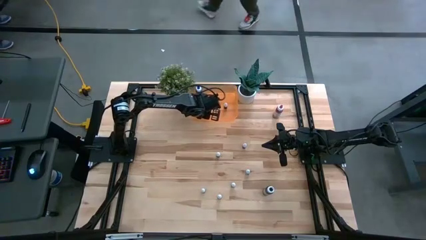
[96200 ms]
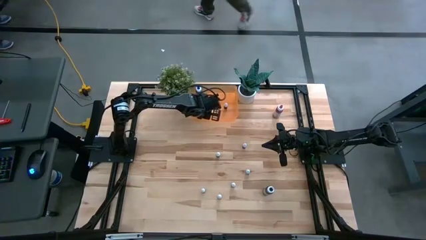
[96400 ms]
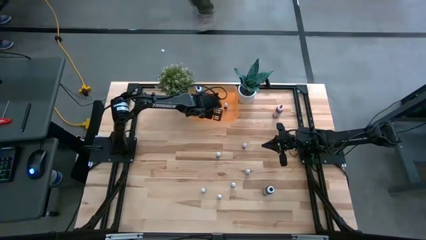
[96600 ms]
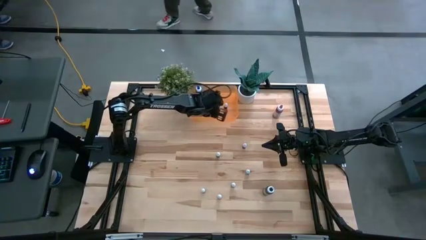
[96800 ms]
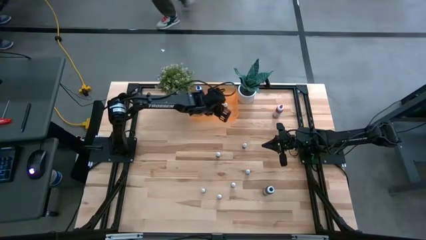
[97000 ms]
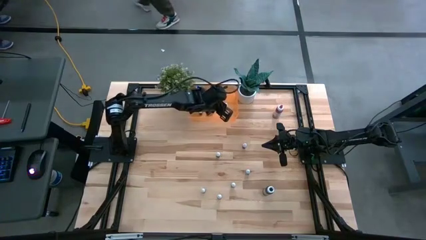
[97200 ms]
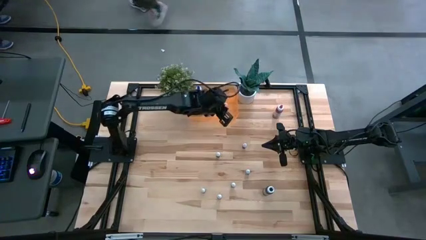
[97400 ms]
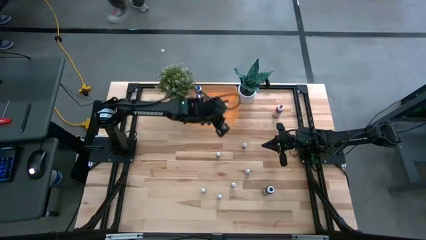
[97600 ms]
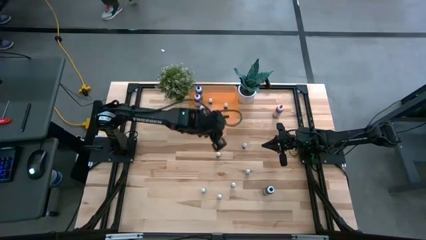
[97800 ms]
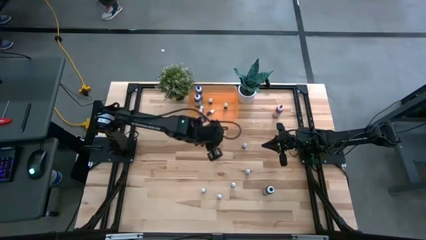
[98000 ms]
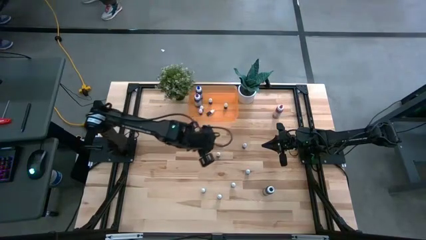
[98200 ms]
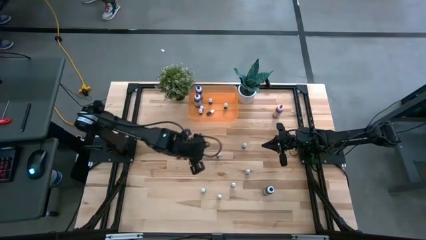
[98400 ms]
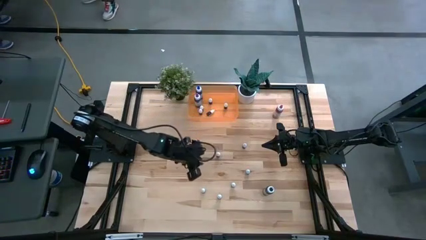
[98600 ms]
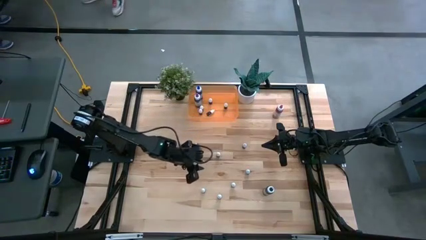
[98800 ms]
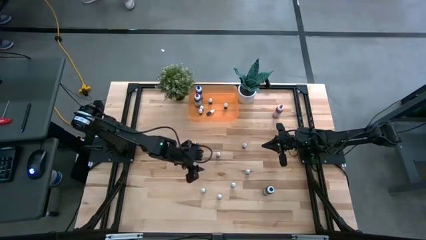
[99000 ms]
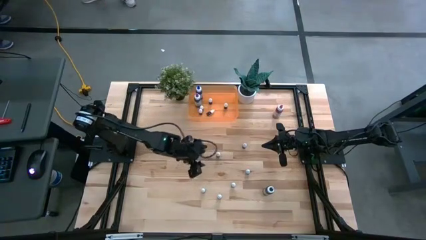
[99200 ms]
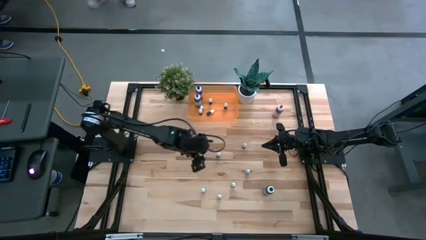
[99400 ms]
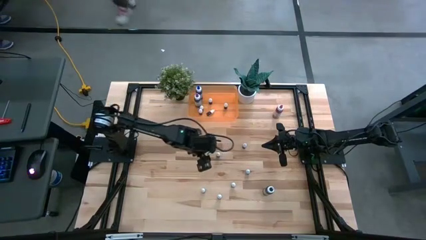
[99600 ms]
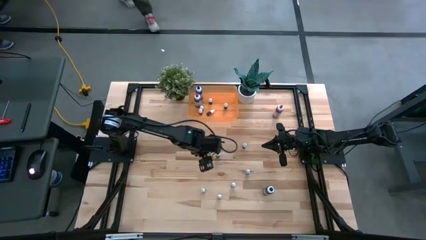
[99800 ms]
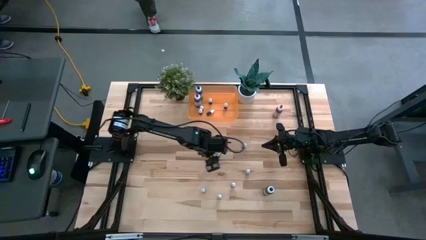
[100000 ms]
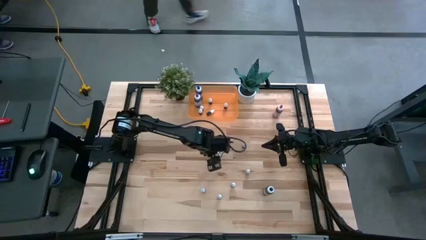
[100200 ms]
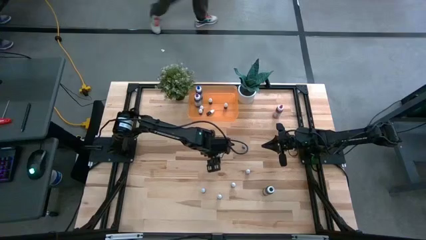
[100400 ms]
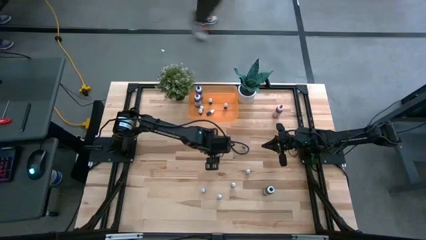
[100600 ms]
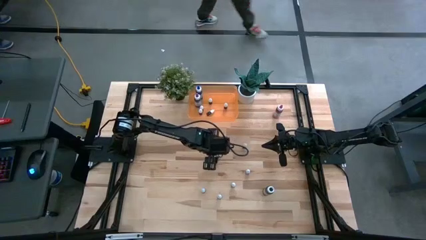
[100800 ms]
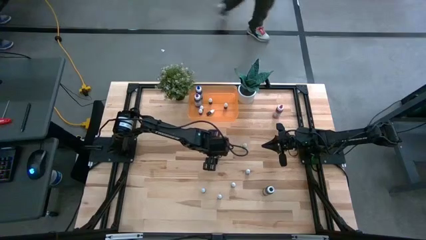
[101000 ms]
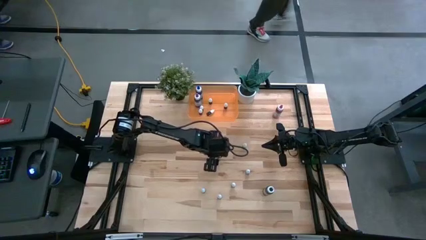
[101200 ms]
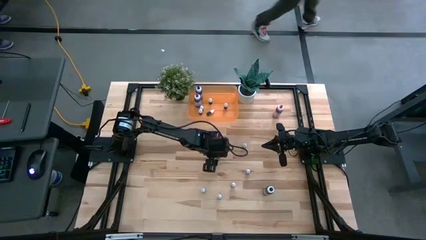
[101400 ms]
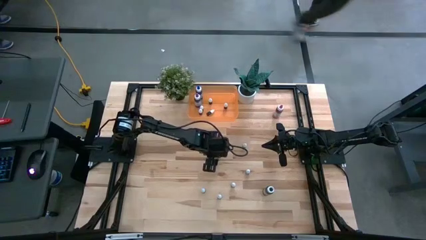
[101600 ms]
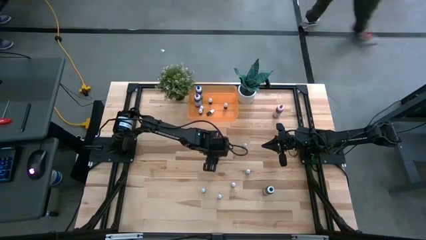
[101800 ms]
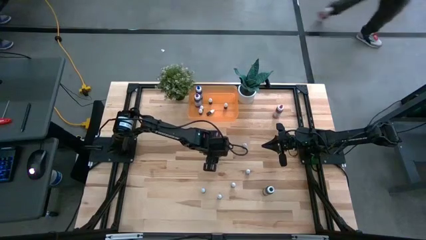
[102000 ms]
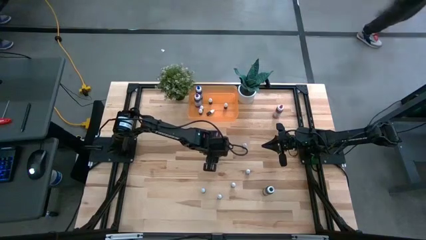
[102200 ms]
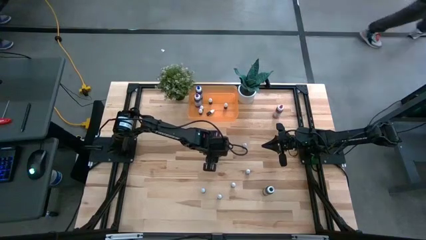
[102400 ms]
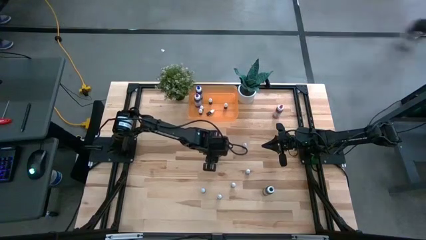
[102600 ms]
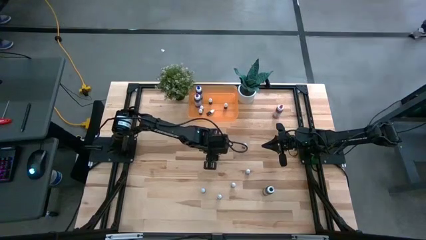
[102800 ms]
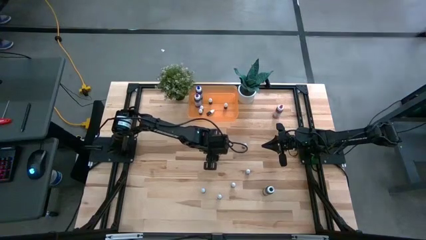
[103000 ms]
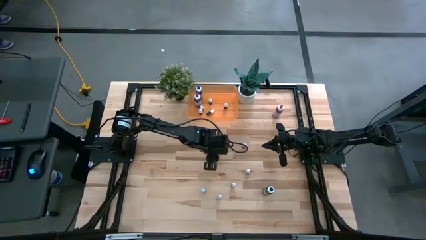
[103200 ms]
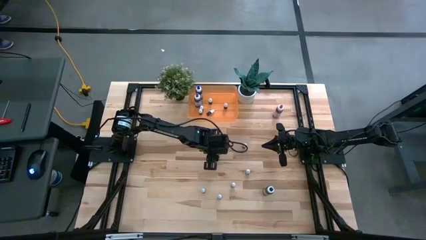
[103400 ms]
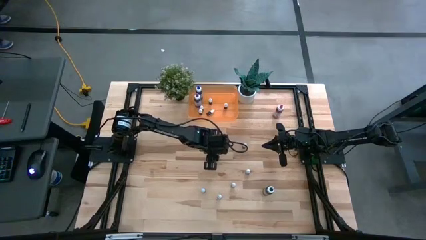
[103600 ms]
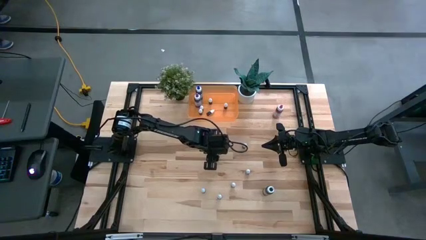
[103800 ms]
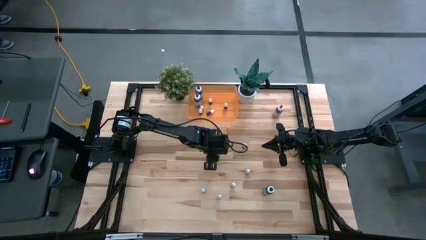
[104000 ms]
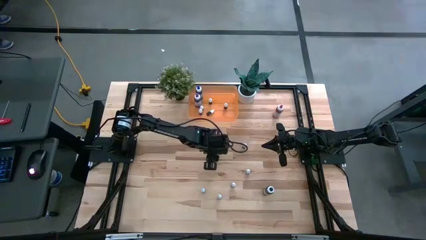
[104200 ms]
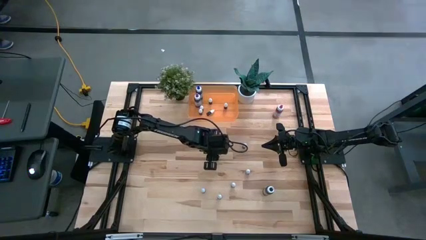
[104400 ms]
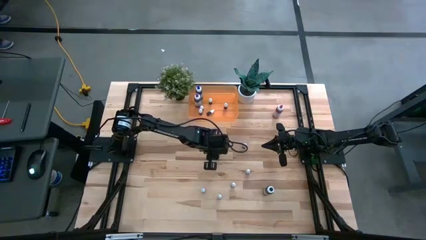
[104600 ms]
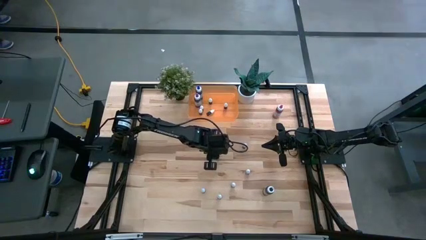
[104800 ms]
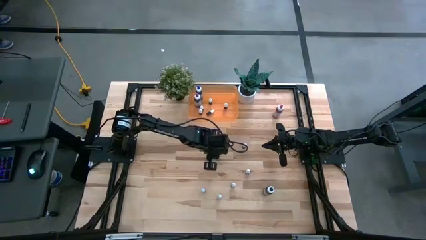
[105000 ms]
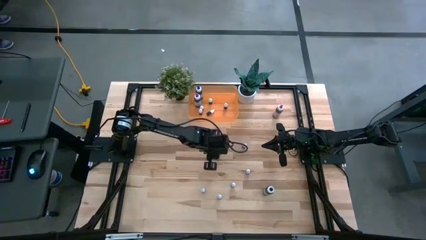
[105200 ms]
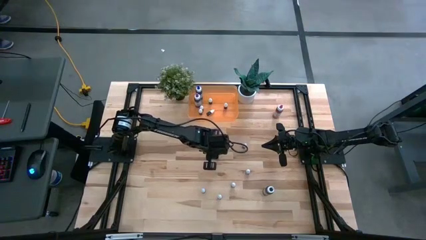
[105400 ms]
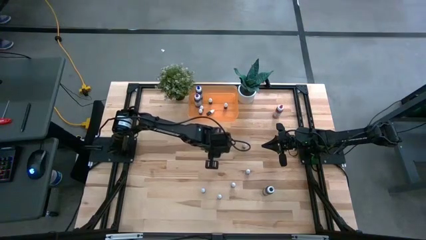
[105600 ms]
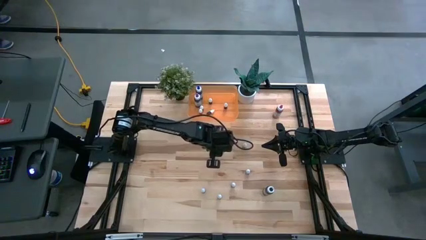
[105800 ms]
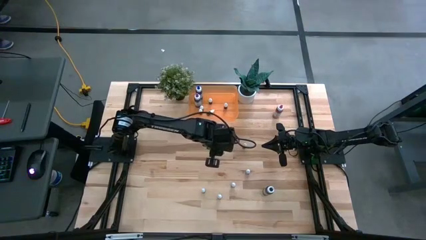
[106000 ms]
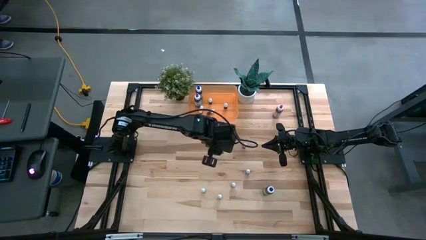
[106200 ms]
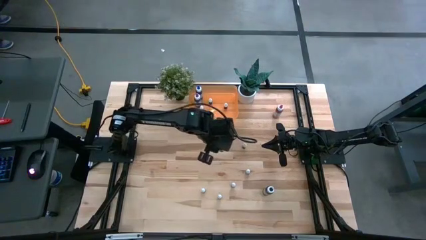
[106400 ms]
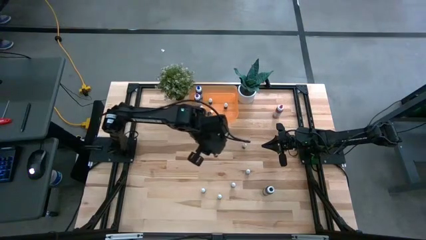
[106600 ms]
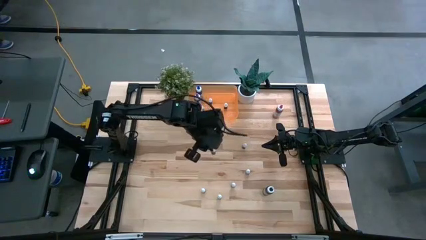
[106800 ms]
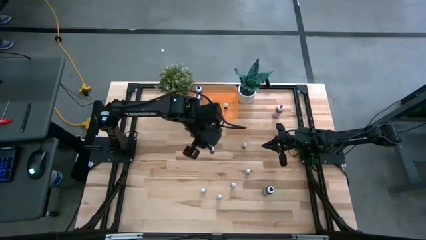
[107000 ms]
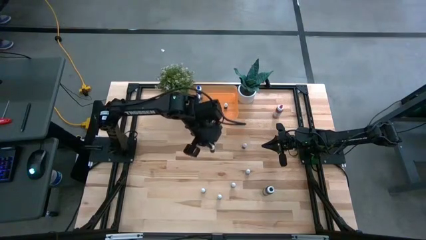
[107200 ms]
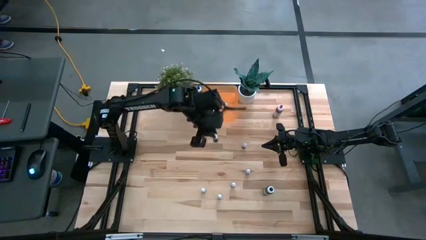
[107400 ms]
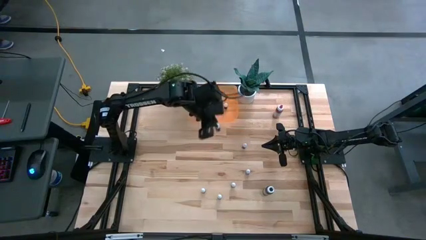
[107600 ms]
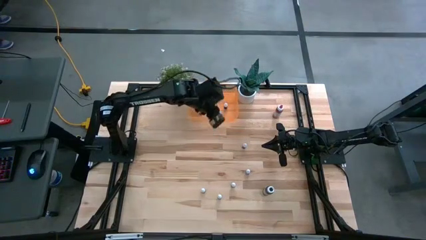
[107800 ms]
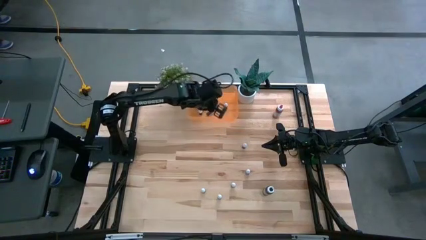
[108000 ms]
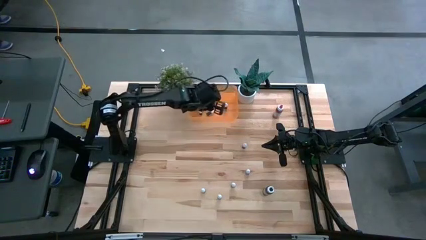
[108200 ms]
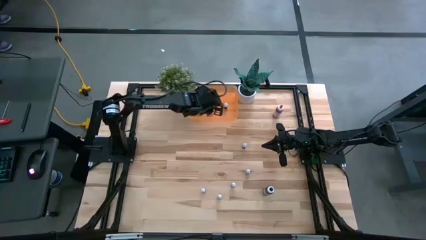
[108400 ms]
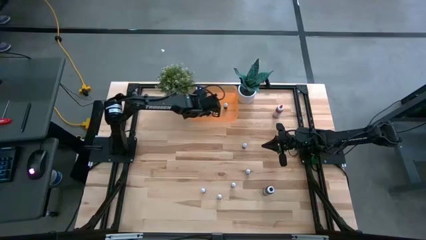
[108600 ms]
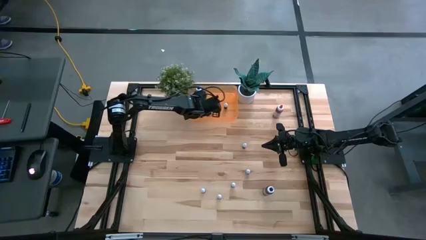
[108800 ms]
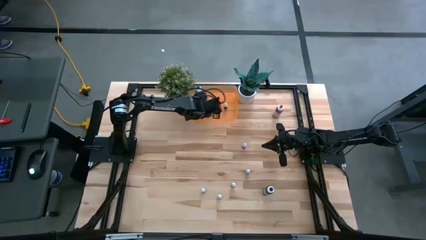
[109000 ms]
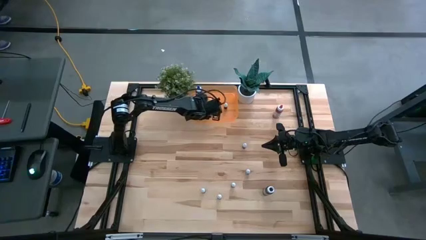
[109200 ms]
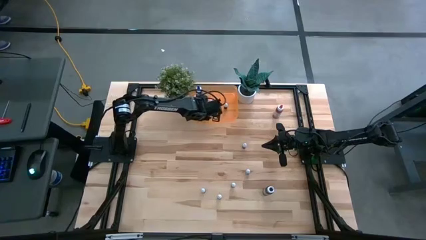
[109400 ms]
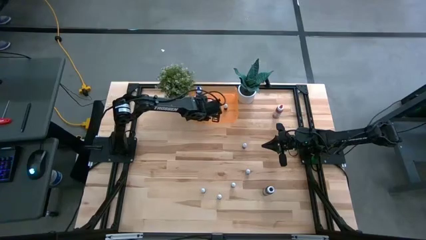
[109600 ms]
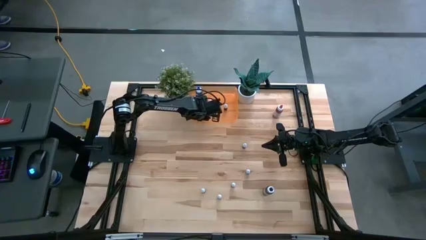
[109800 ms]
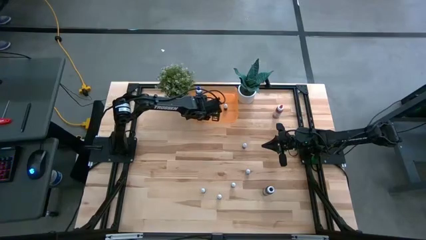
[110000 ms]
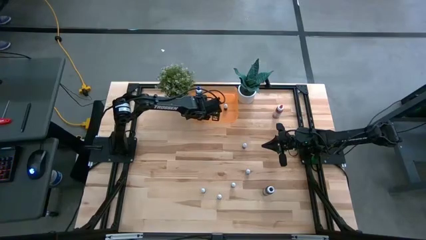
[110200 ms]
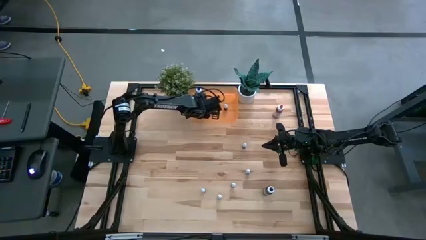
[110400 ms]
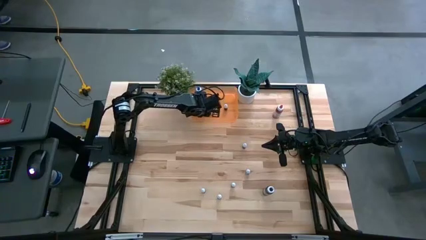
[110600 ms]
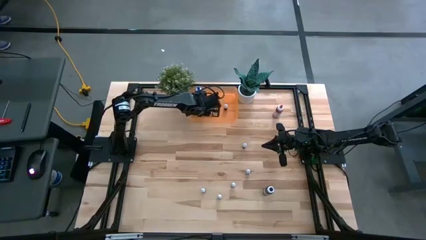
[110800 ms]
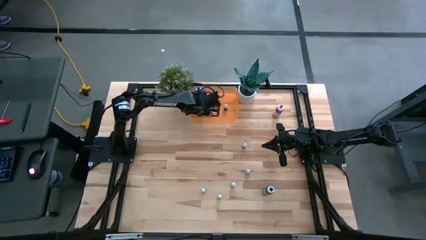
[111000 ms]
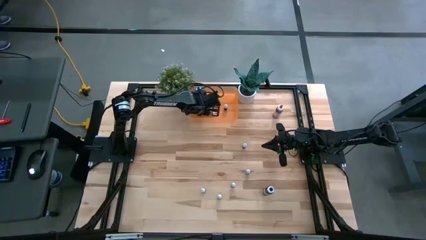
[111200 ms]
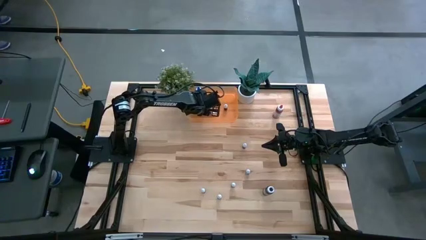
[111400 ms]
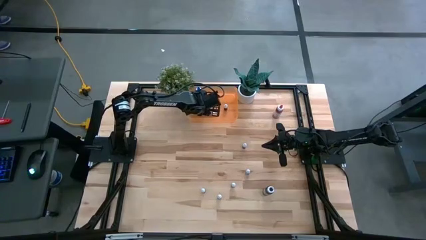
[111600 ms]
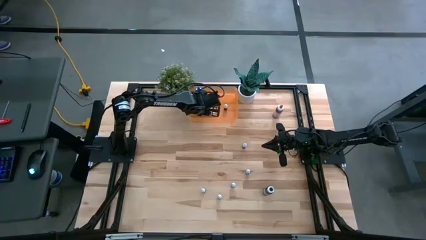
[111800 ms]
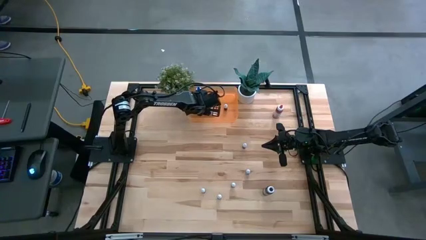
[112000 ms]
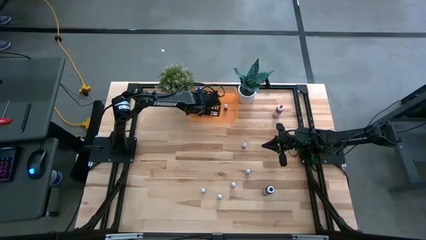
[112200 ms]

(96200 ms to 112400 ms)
Task: Pick & Place food coloring
Put the small green bottle into the bin
